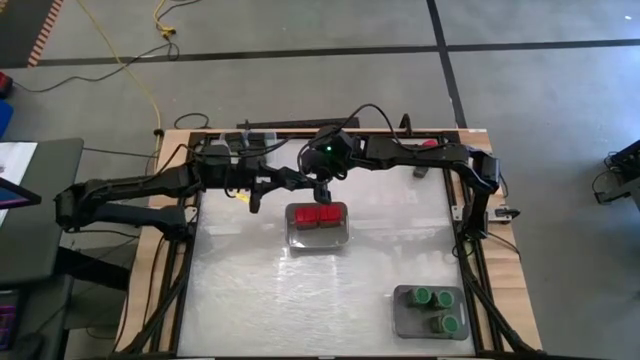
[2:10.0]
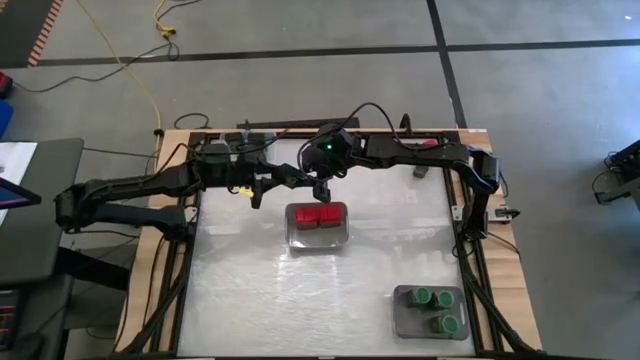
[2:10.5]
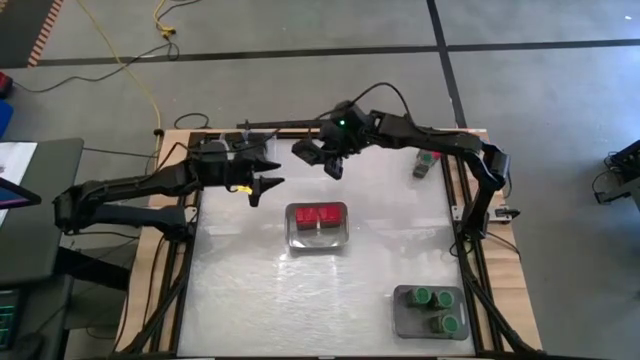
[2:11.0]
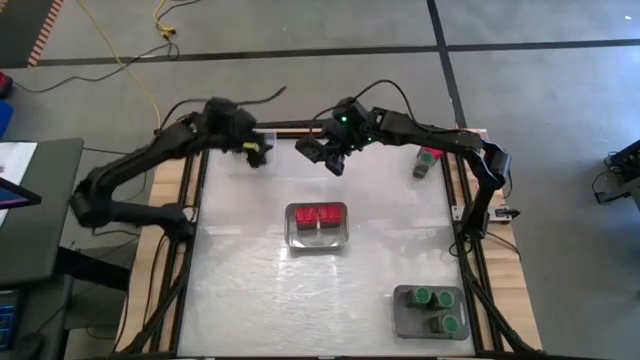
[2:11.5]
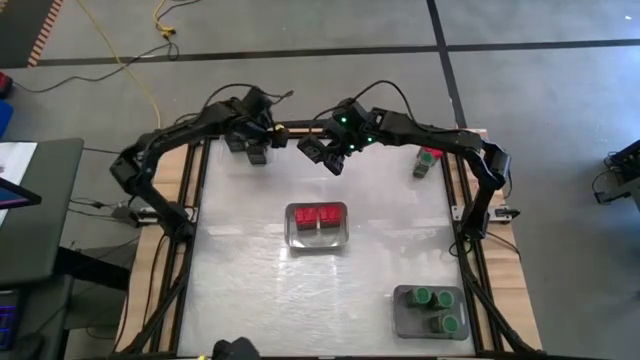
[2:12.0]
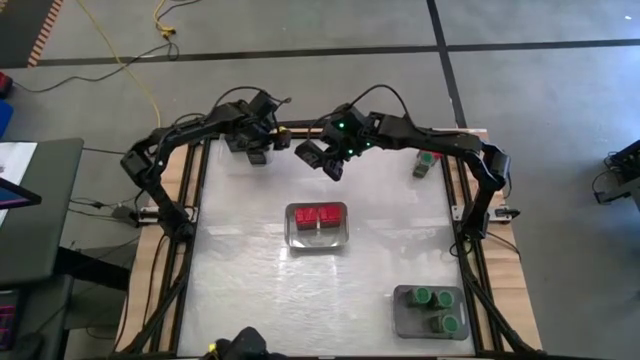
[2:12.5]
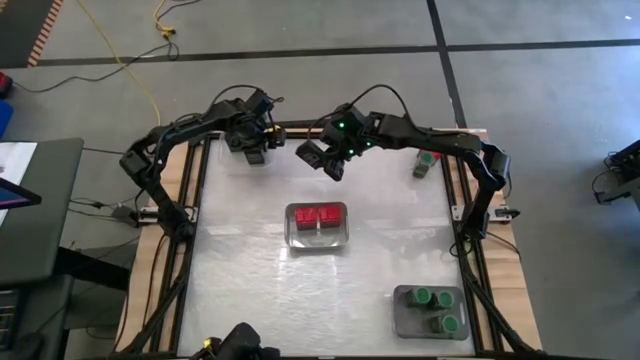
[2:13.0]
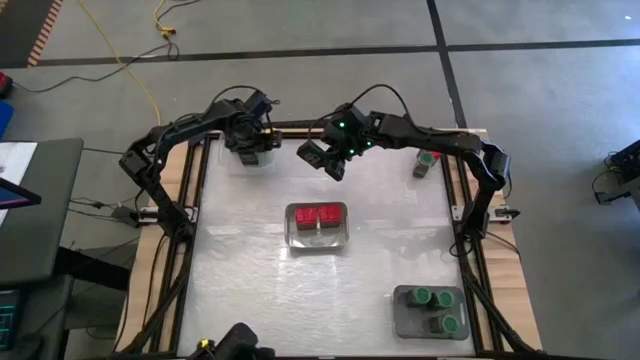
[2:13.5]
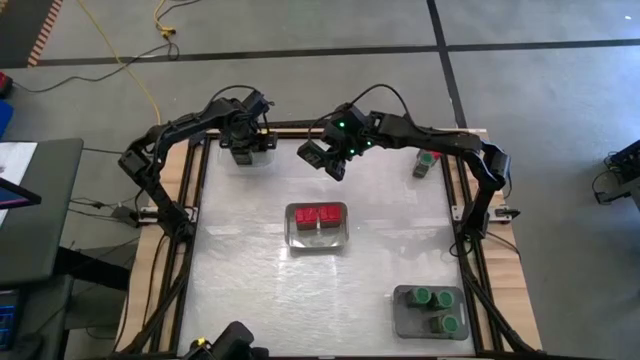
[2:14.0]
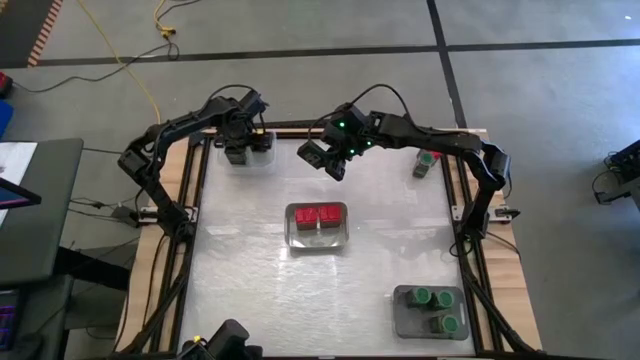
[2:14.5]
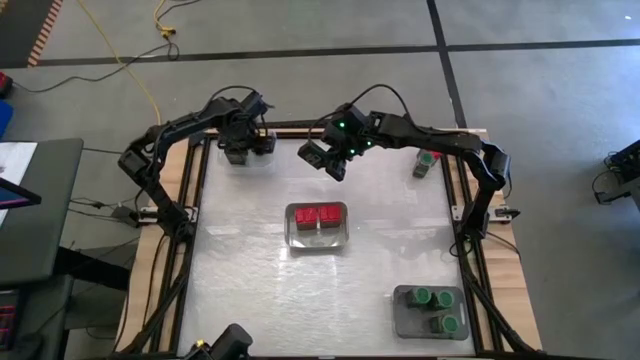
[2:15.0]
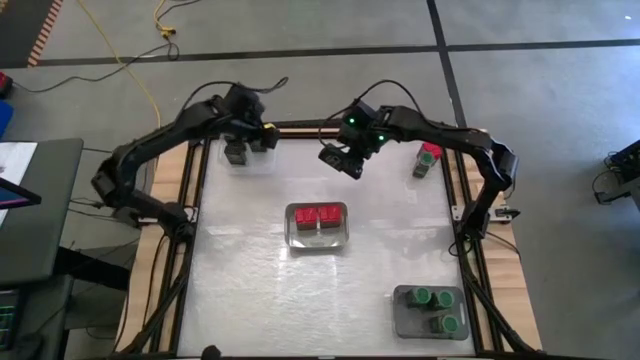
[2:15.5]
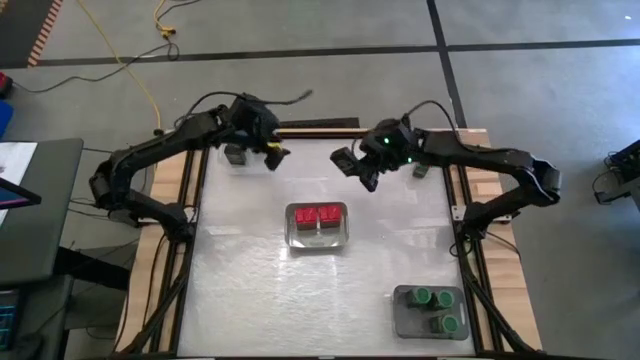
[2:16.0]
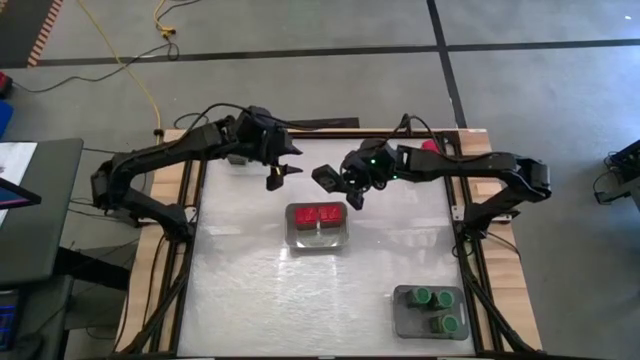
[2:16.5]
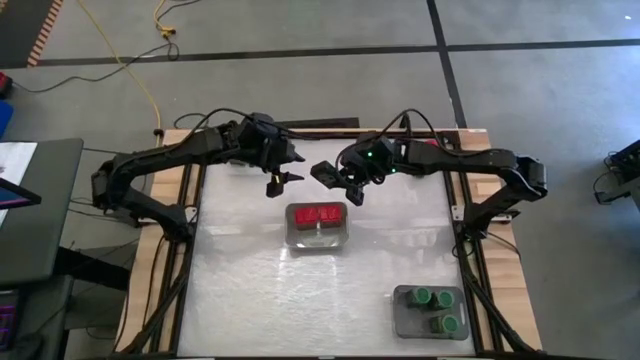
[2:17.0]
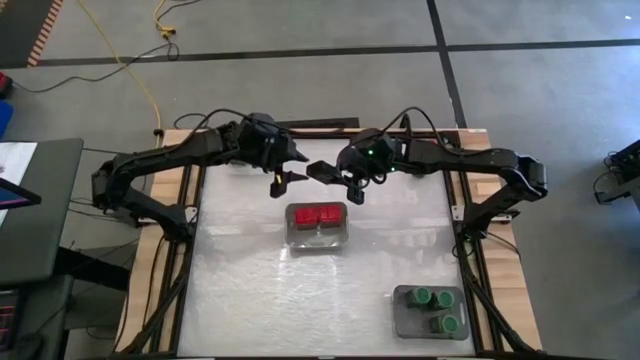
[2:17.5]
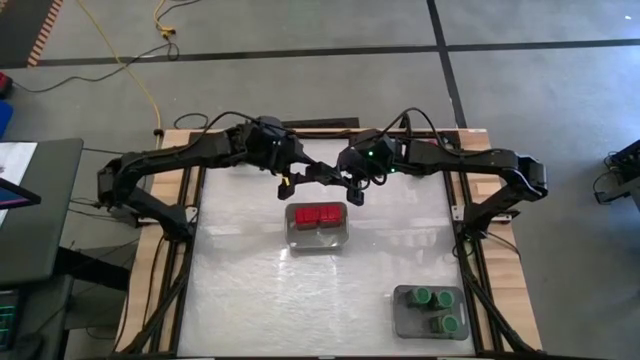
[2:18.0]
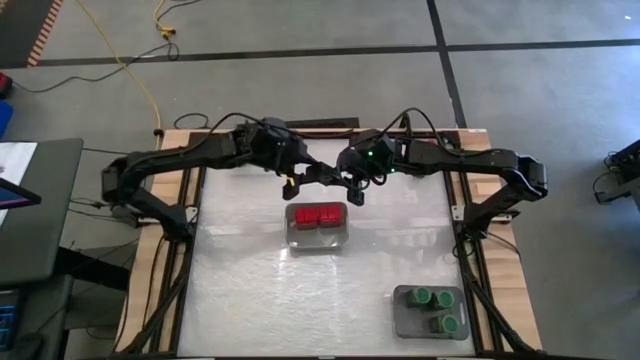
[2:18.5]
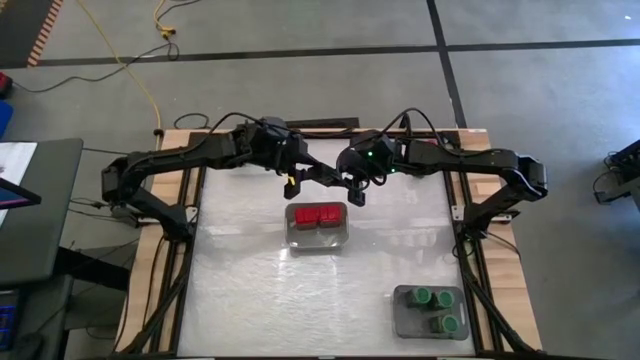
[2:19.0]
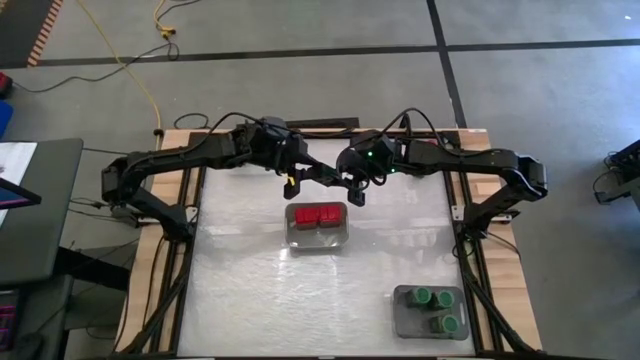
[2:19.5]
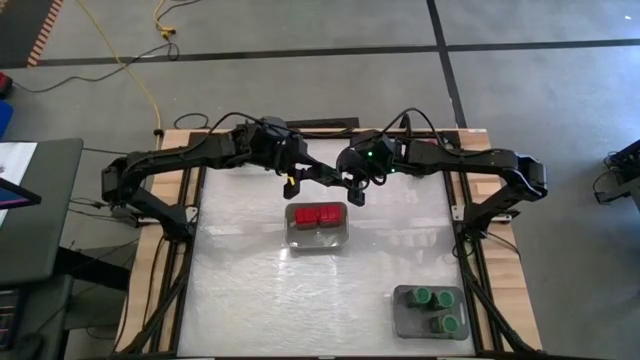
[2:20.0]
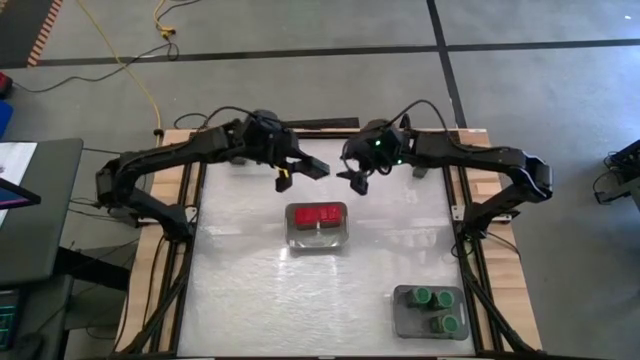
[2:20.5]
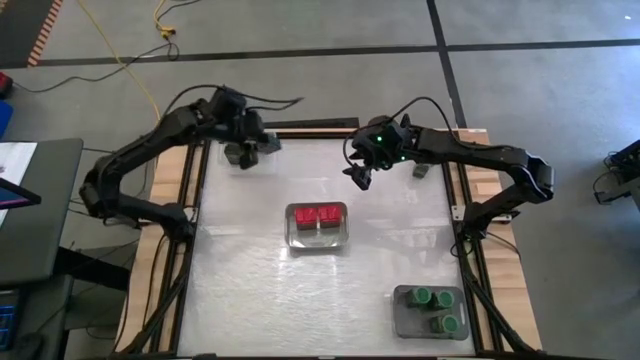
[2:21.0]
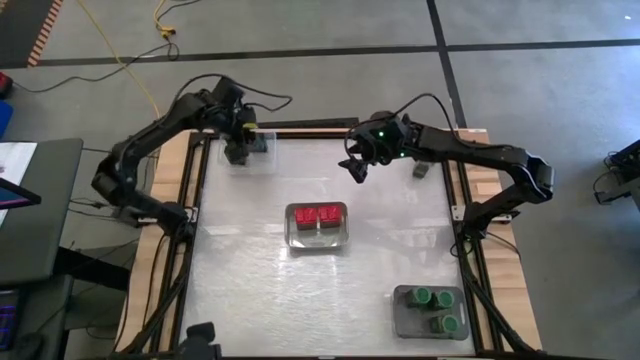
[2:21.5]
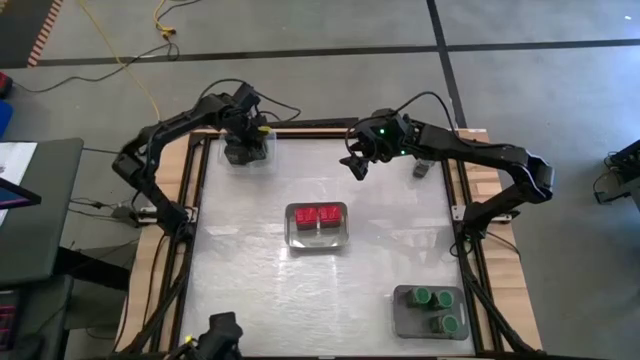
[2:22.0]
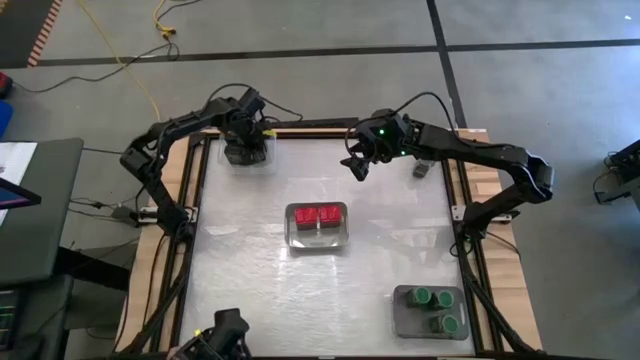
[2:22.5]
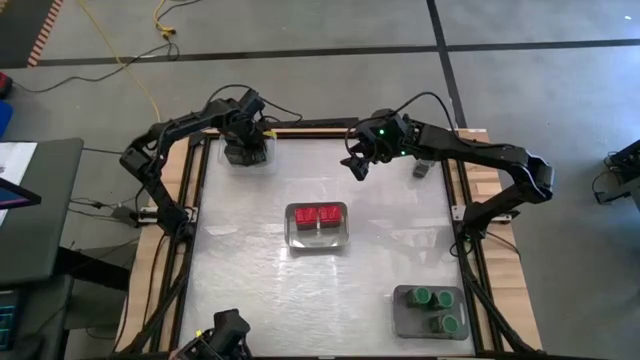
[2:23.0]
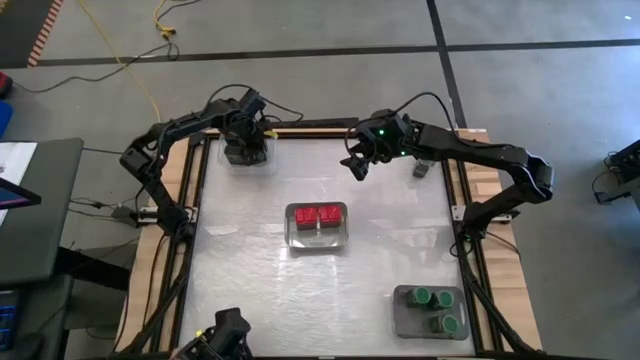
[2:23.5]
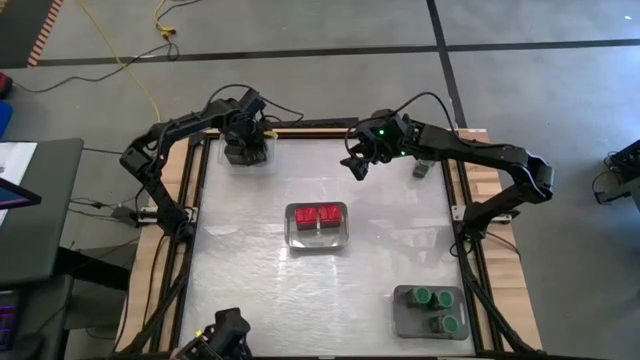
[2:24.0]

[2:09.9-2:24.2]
Task: Sort spices by type
Put the black seasoning can into the transparent bin

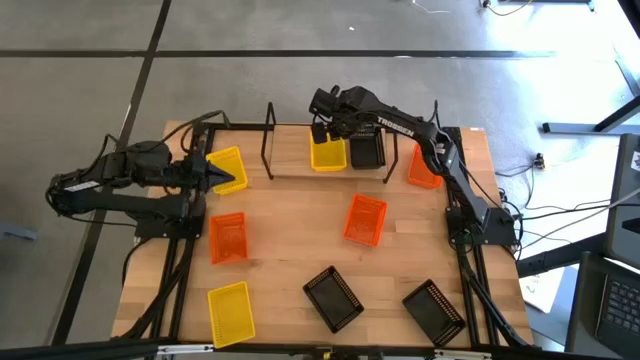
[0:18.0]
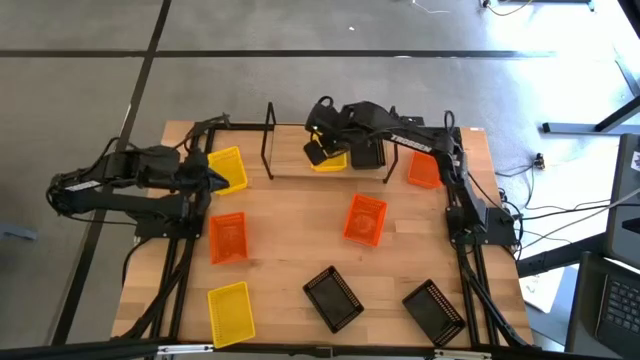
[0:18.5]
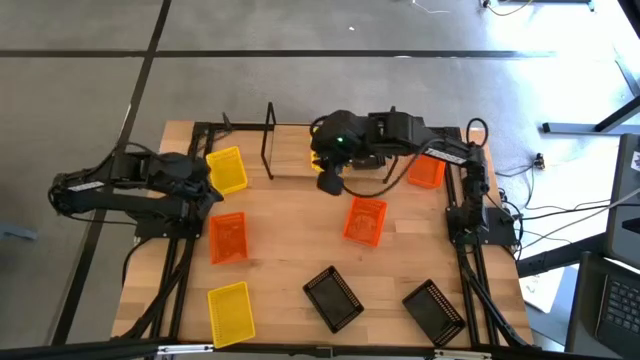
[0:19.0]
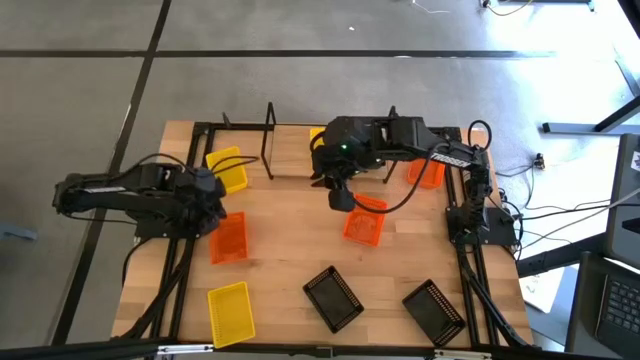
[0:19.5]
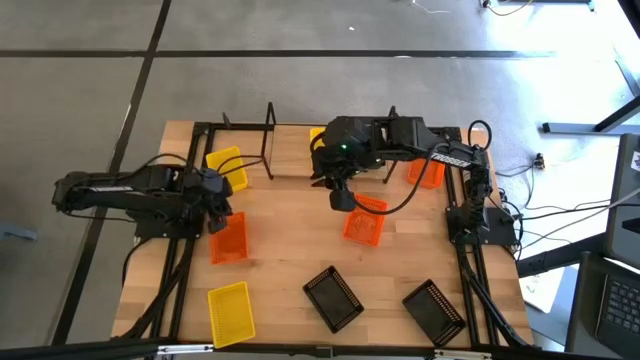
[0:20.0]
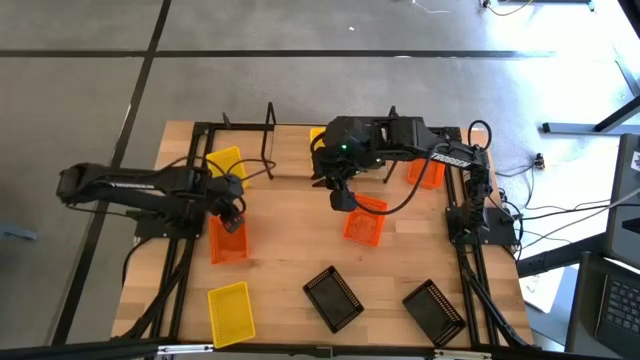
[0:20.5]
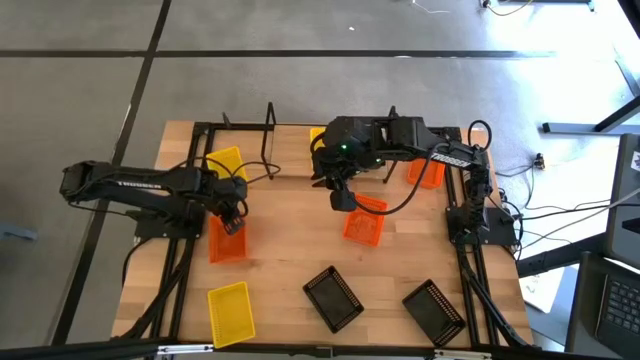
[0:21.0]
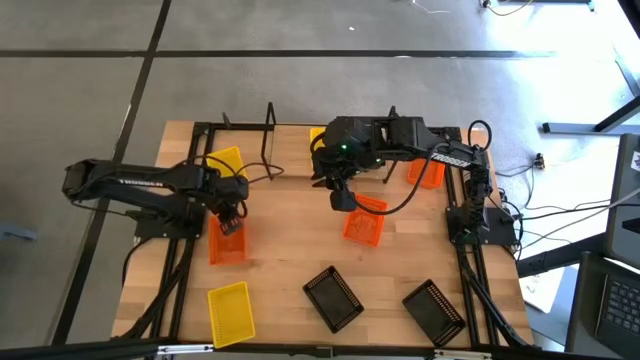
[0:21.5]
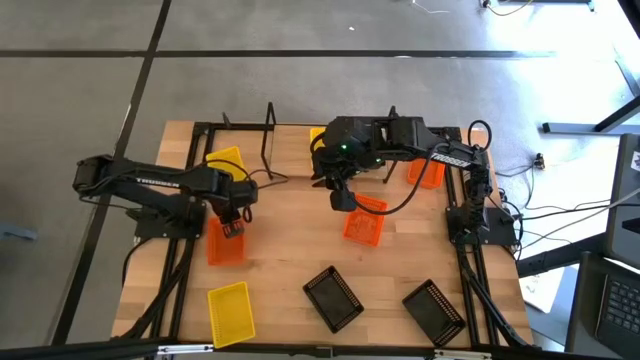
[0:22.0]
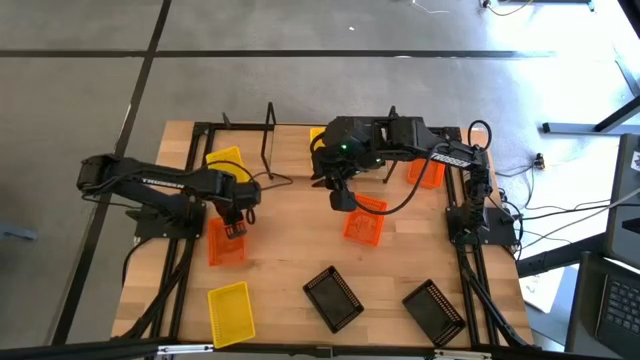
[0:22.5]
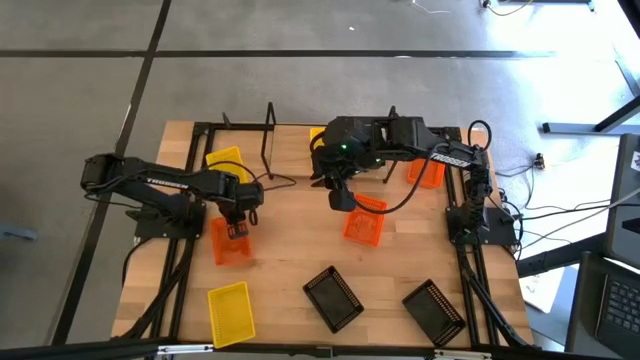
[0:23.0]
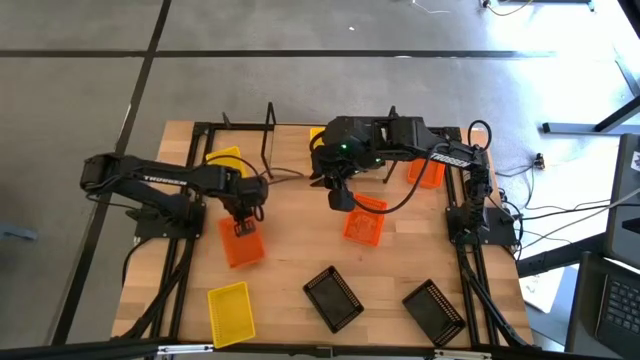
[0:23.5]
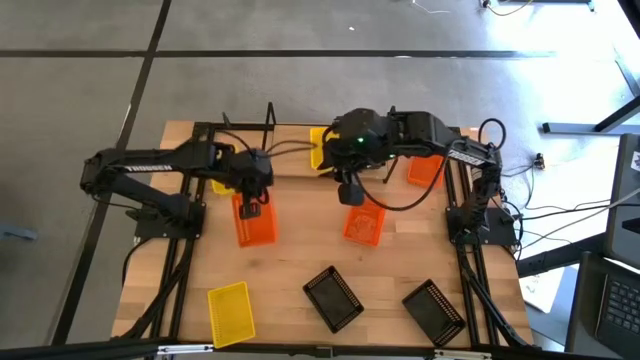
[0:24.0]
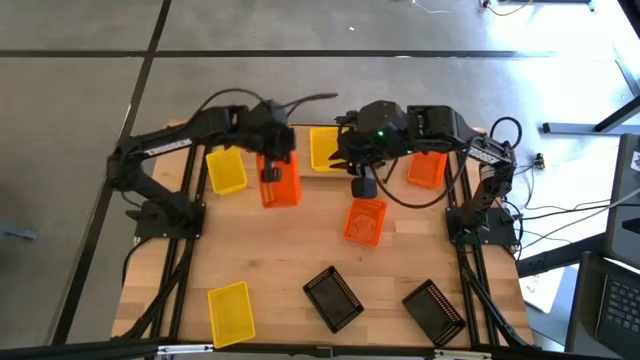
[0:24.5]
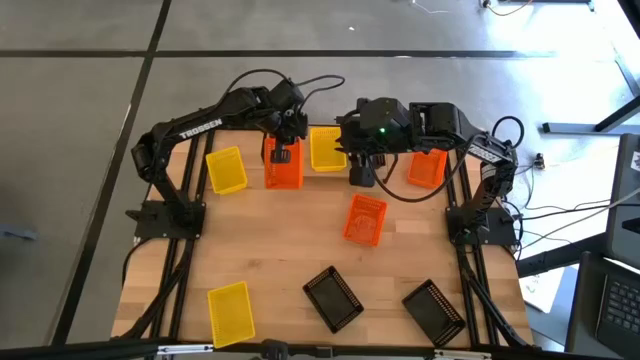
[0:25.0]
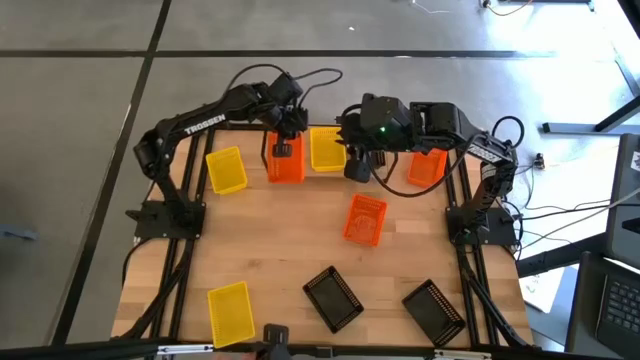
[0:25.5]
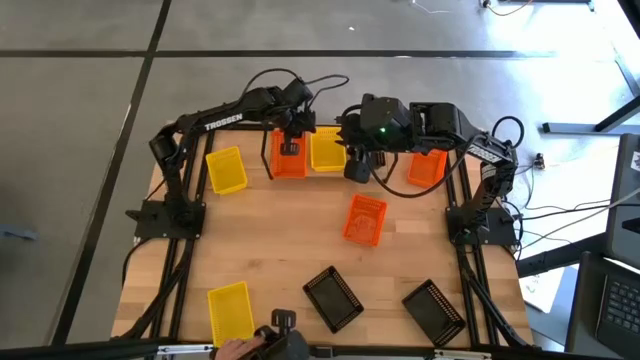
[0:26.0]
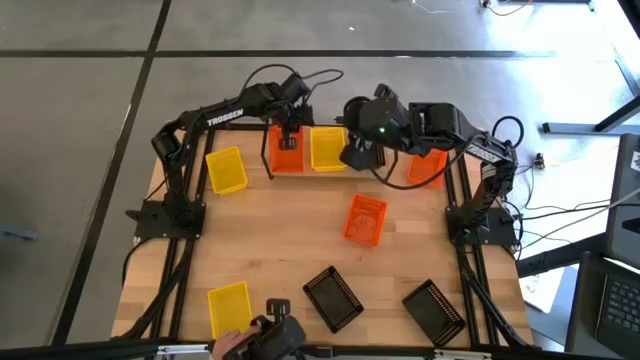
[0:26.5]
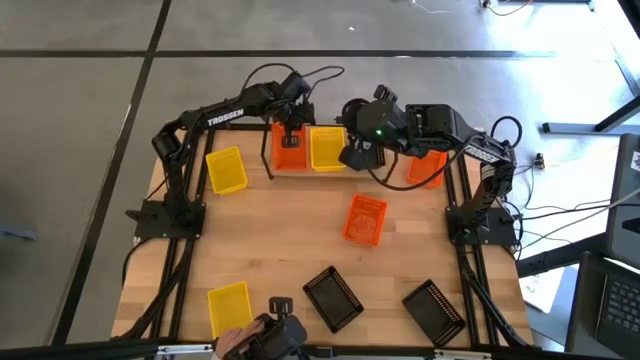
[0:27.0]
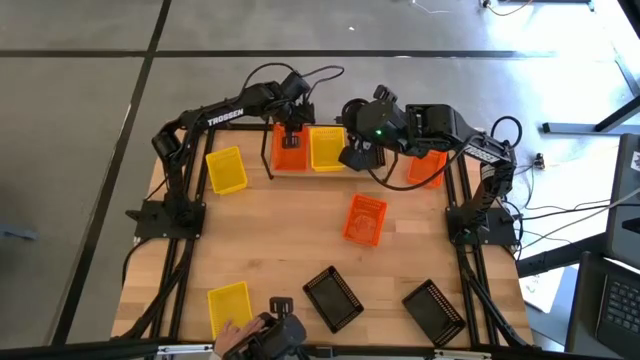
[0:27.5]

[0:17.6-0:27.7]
Task: Stack baskets on shelf by color
Put the middle left orange bin on the shelf
